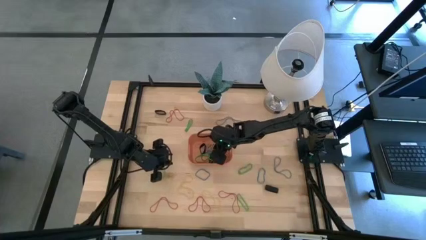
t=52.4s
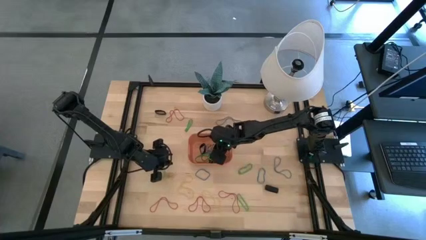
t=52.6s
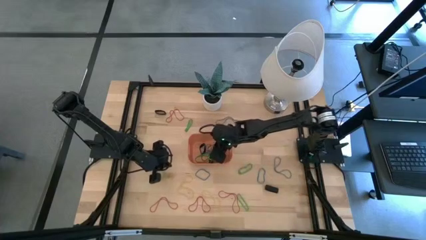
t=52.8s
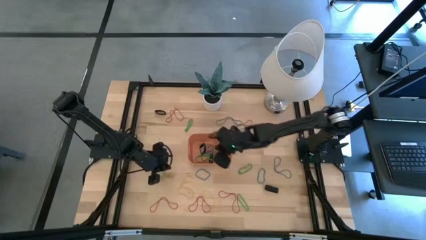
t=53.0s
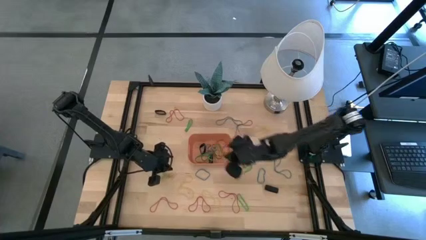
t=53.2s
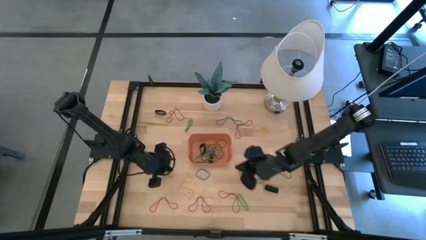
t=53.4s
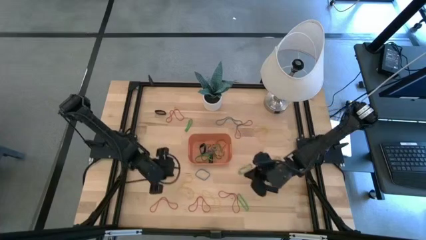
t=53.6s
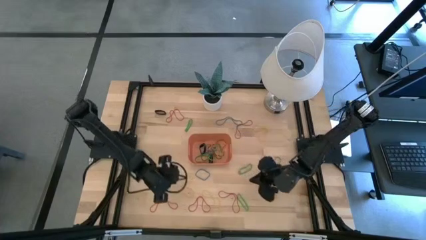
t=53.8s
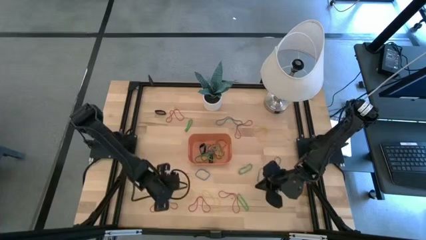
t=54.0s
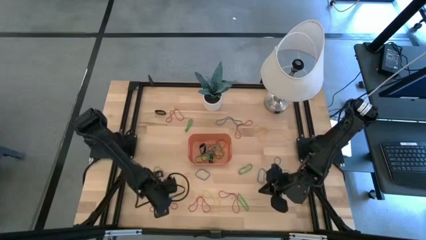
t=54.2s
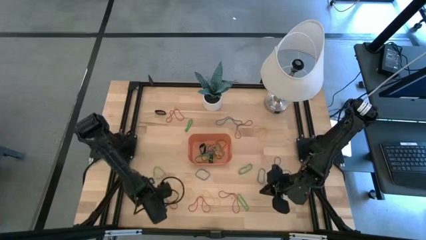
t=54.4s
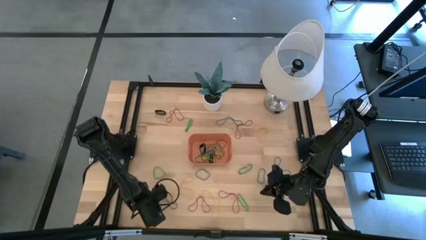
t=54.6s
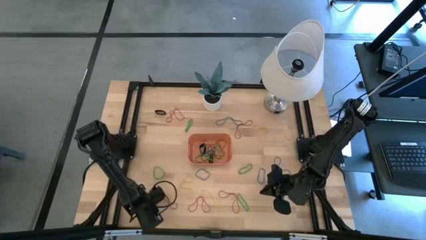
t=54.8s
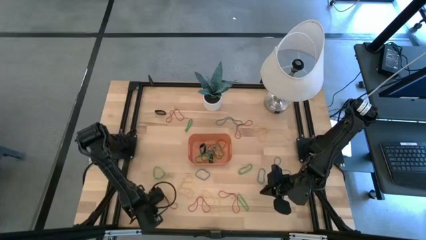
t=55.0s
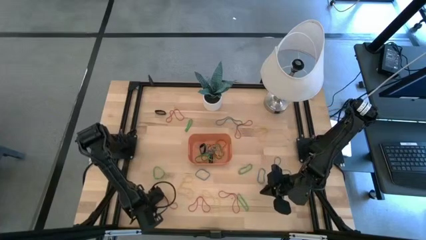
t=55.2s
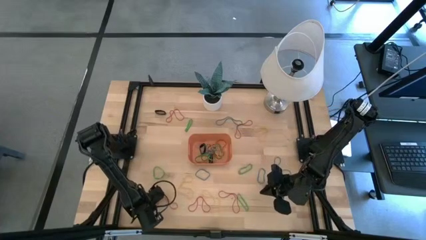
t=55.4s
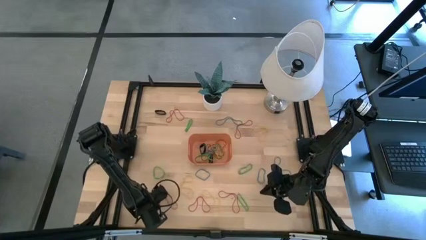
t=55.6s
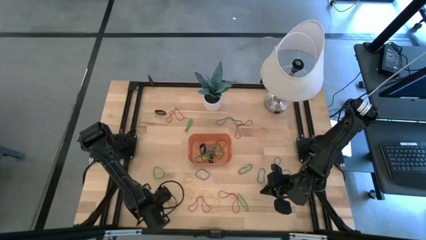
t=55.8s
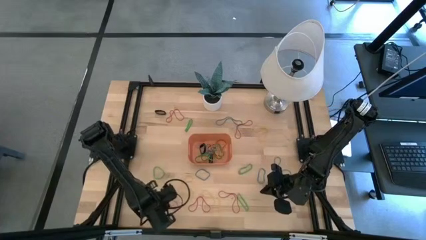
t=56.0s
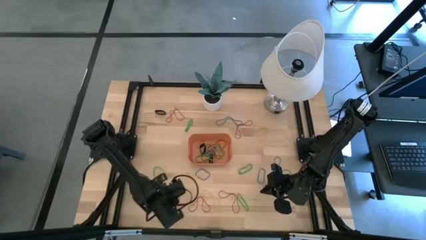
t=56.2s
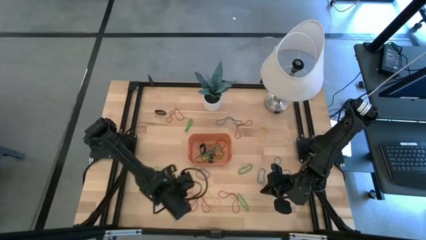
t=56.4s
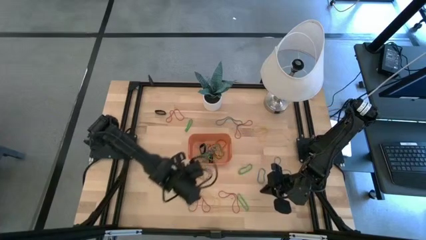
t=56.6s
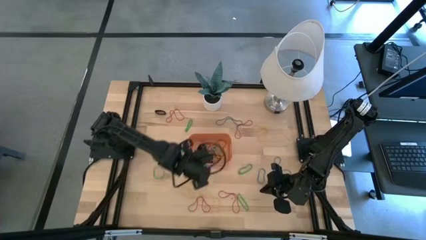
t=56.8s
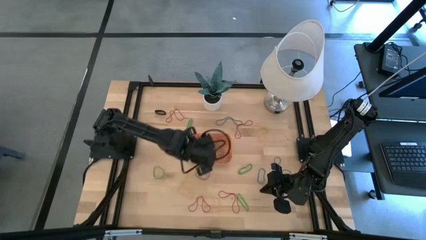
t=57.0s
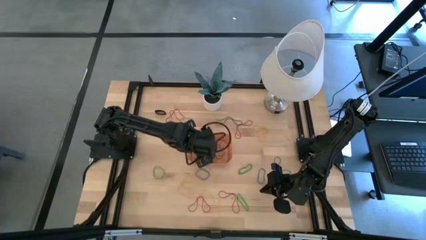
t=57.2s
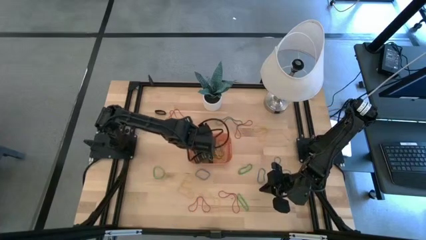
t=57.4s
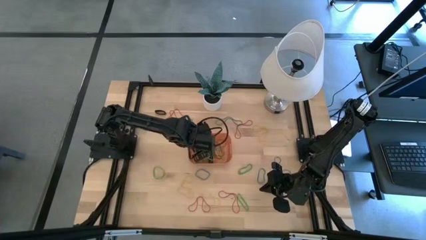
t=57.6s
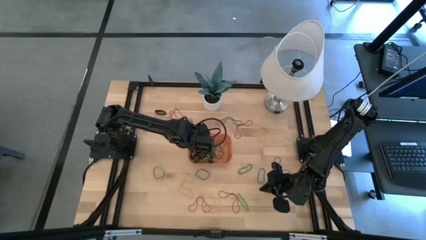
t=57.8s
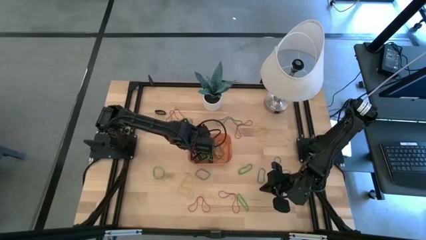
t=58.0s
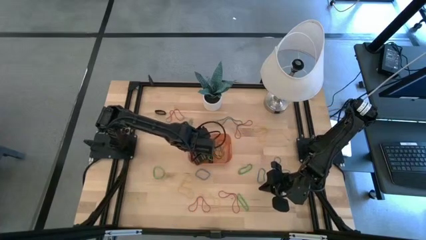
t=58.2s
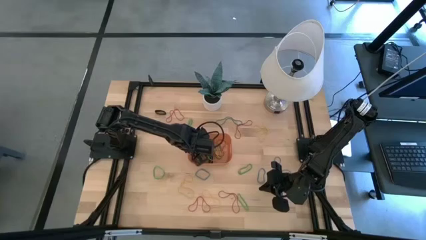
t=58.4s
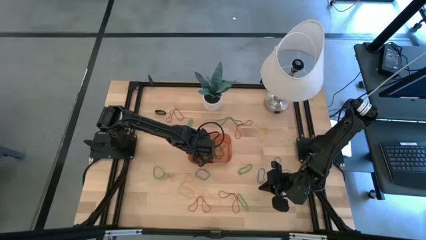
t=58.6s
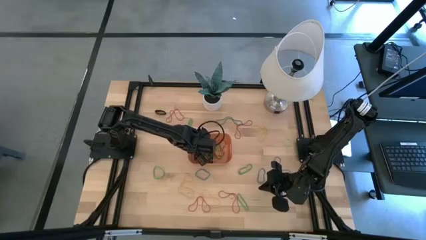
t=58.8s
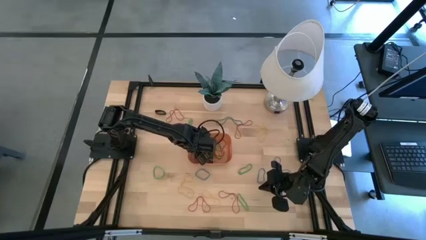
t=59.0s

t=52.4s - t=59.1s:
Task: Pick and place rubber bands into bin
Put the red rubber band into the orange bin

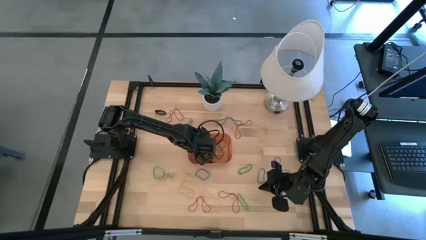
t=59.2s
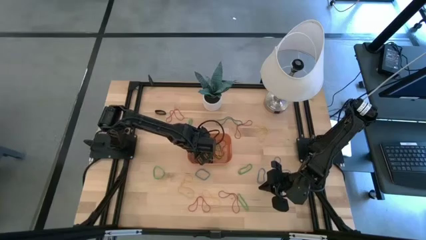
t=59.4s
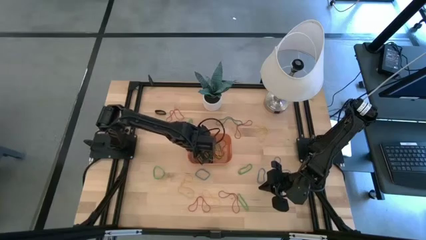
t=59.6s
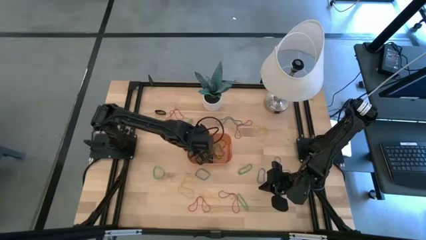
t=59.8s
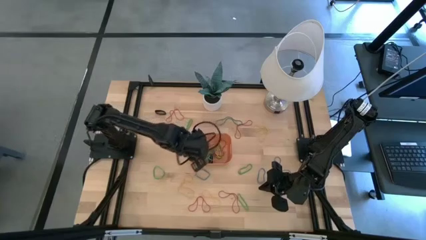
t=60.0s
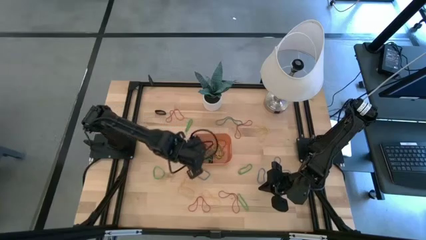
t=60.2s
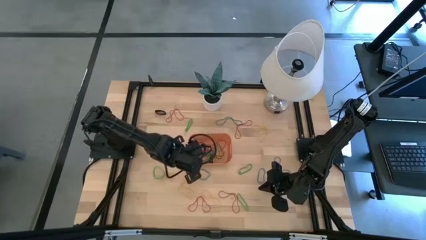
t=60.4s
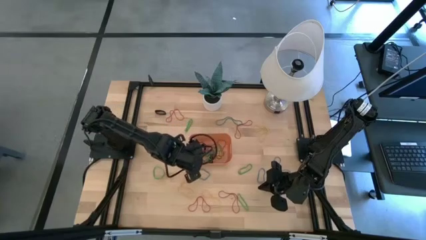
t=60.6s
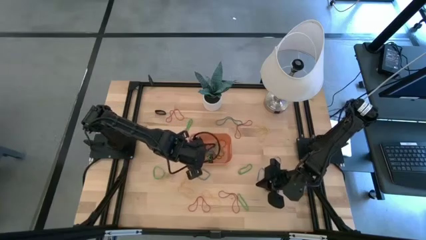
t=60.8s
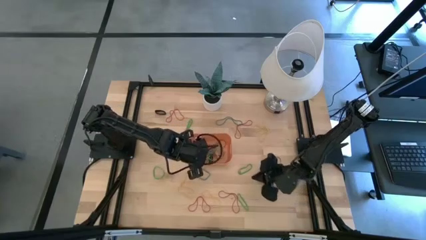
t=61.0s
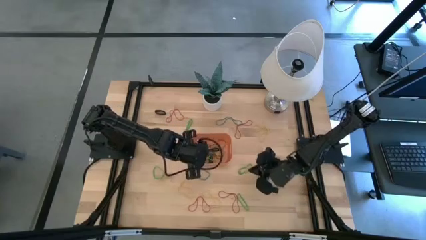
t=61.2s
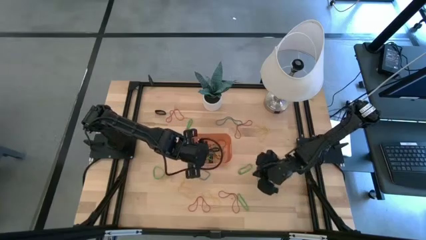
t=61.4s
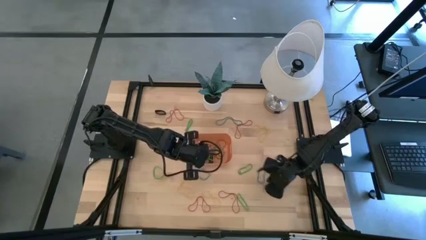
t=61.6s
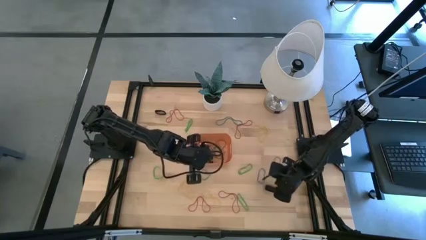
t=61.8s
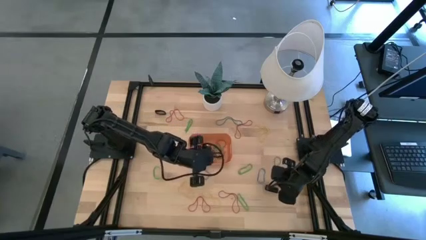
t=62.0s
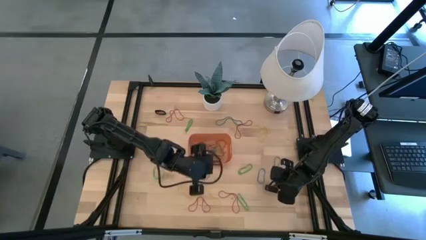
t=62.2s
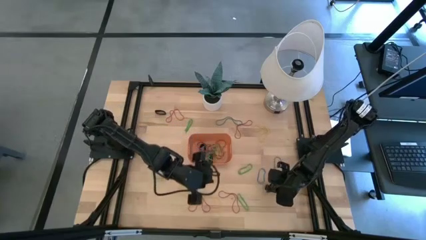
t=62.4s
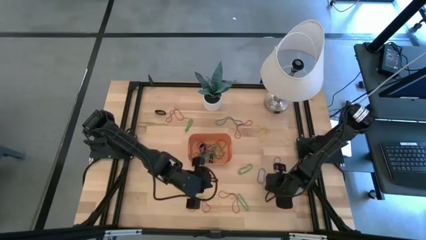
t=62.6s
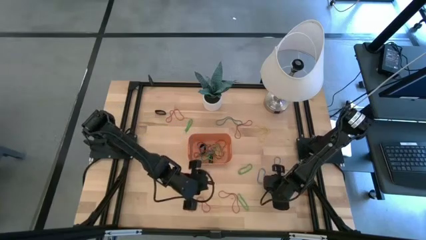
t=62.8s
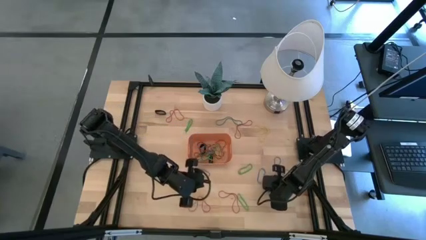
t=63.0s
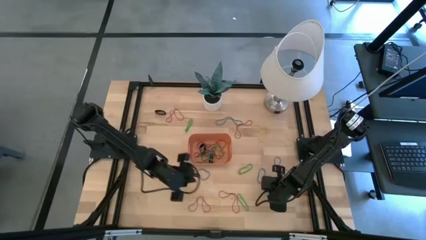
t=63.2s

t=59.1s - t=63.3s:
Put the black rubber band into the orange bin

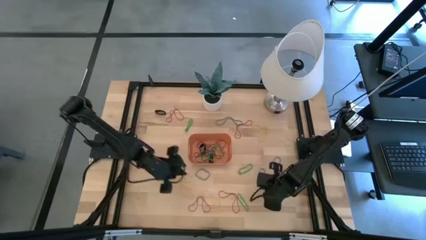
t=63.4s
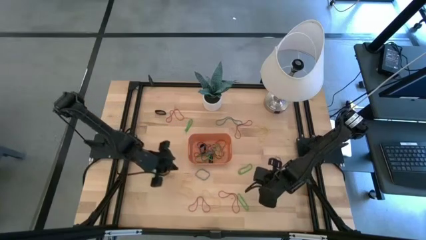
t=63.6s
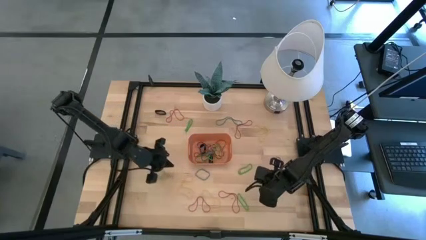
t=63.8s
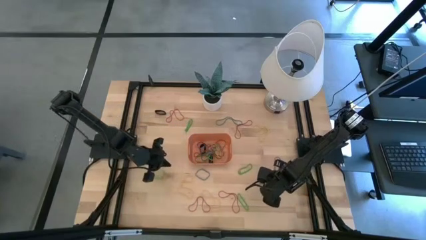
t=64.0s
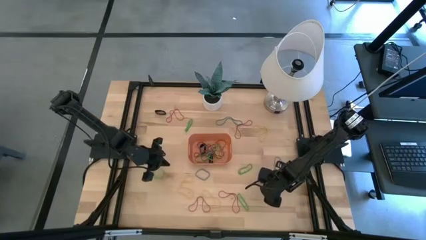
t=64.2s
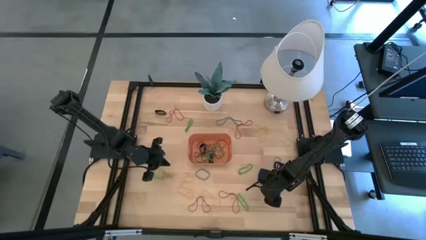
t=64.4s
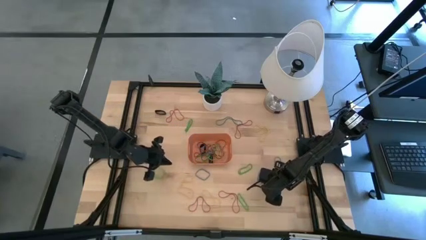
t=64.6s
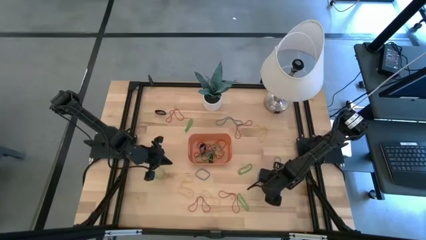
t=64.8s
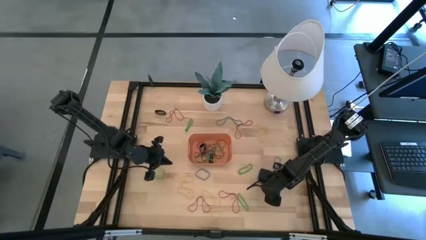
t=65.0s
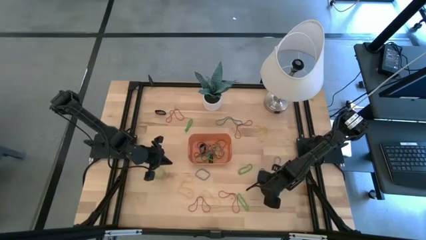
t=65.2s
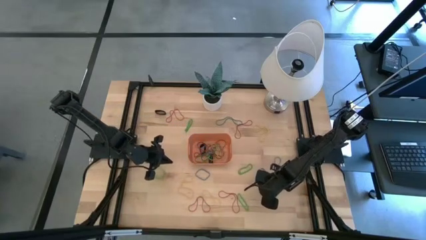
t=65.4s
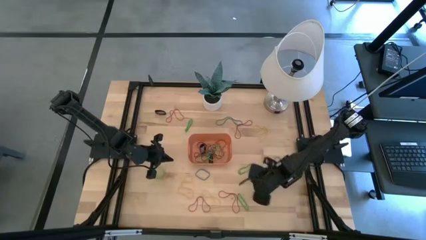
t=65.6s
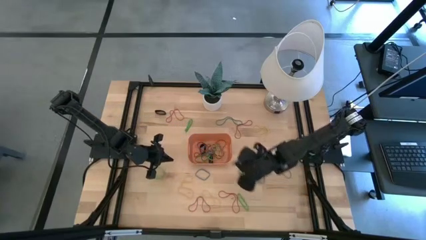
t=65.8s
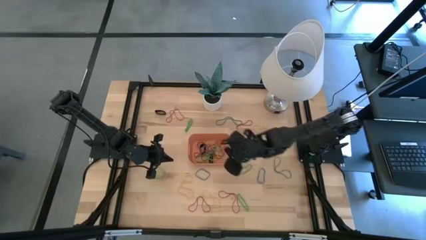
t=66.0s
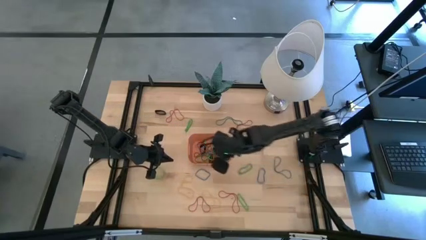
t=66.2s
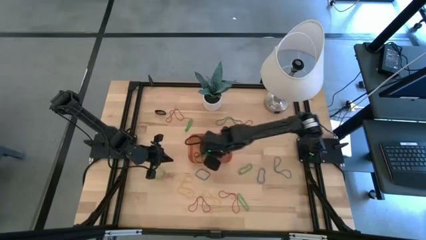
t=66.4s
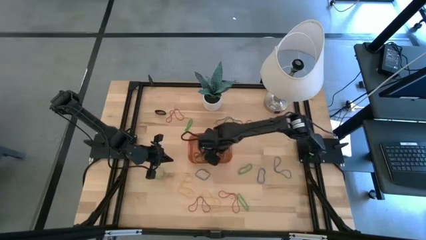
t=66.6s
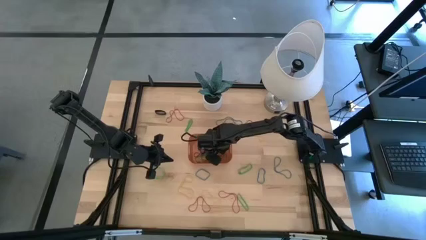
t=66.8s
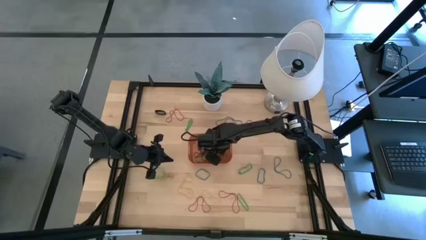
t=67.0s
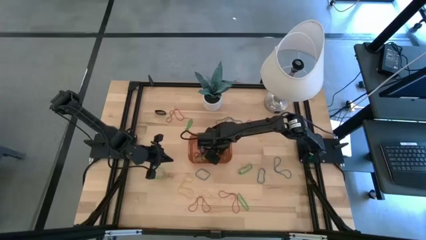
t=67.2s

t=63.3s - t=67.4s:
Put the black rubber band into the orange bin

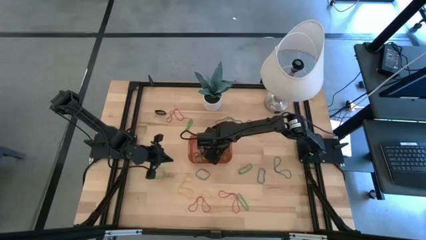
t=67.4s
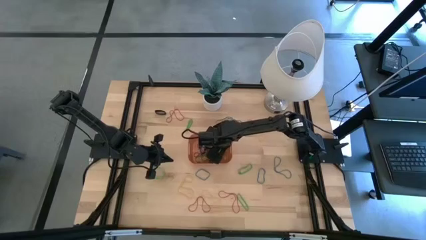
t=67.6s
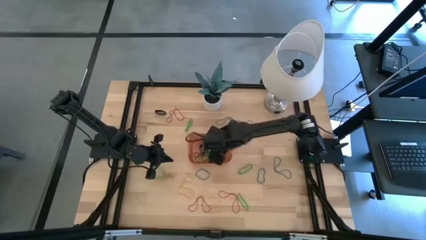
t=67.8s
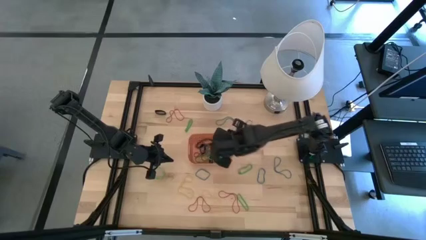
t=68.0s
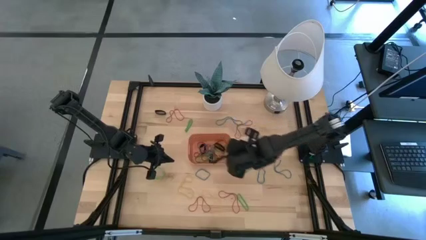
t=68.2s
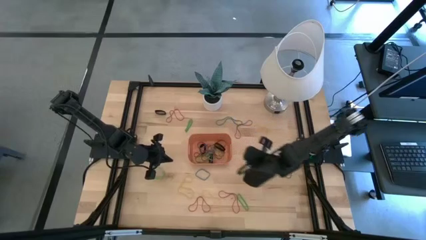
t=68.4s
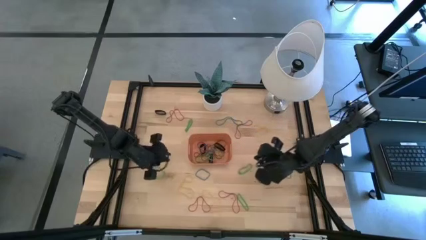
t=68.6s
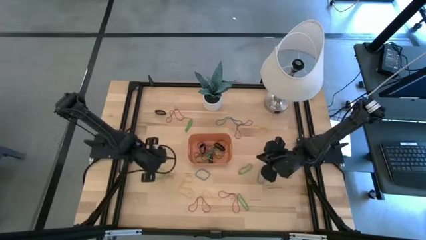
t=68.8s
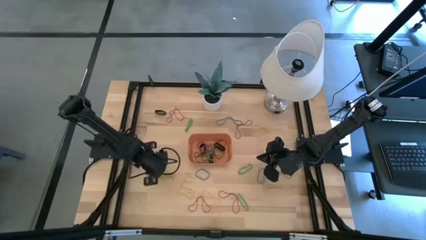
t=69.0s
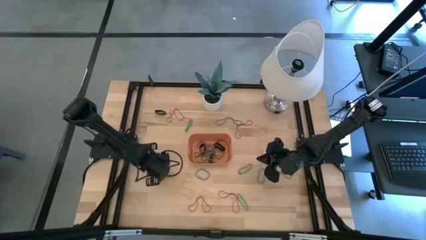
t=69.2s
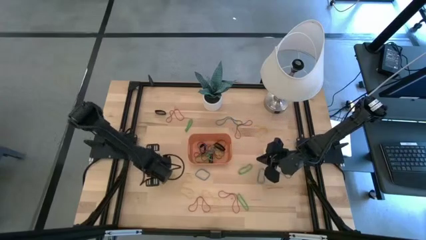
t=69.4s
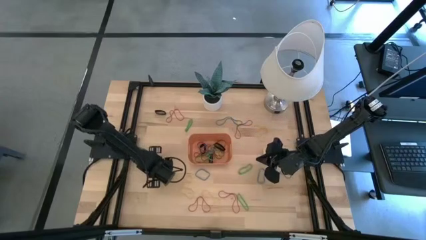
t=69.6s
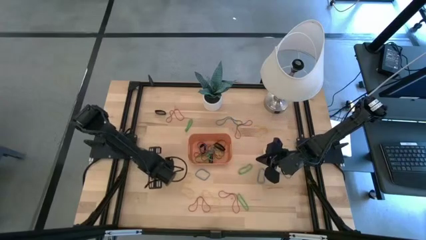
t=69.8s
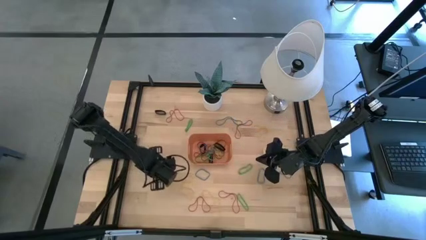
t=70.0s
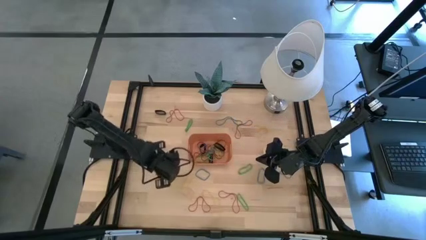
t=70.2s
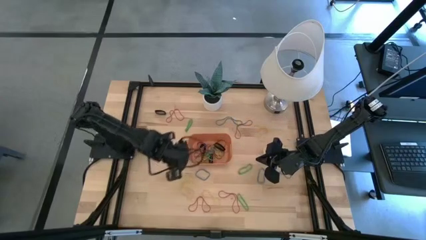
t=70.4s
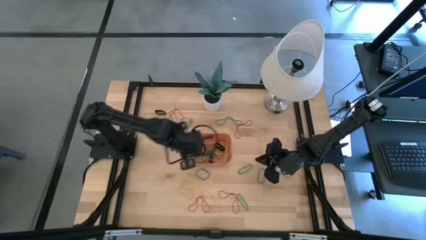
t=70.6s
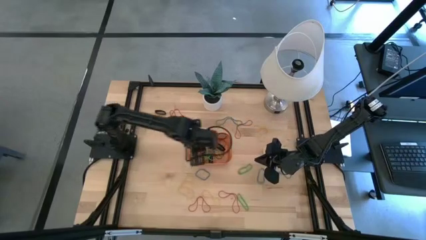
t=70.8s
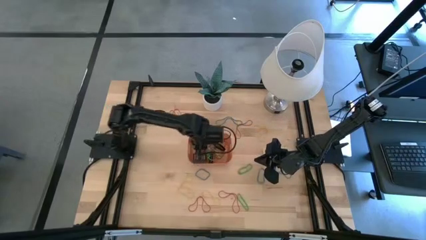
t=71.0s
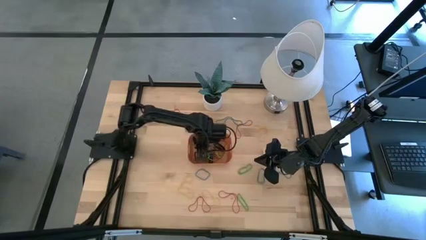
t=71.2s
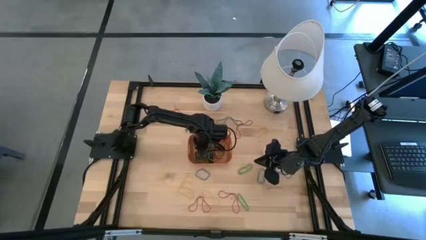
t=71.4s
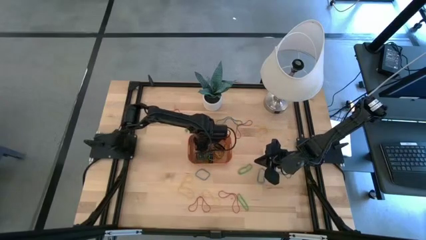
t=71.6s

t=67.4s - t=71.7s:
Put the green rubber band into the orange bin
